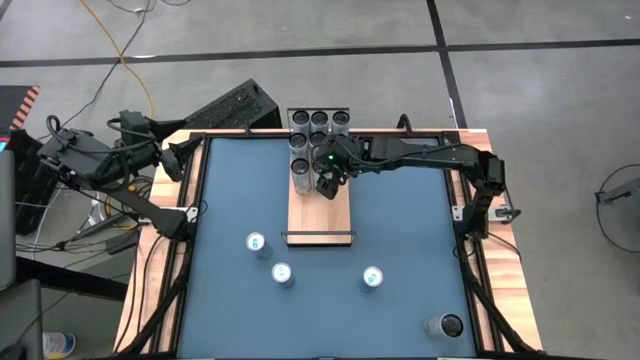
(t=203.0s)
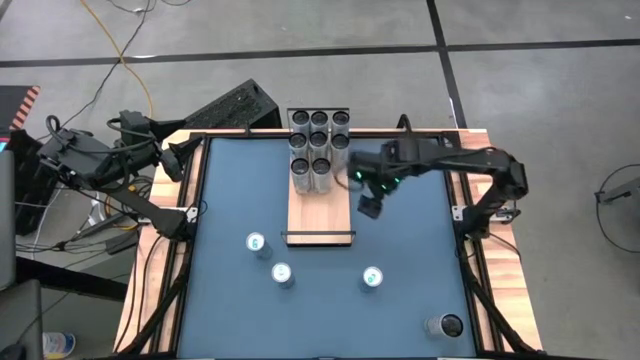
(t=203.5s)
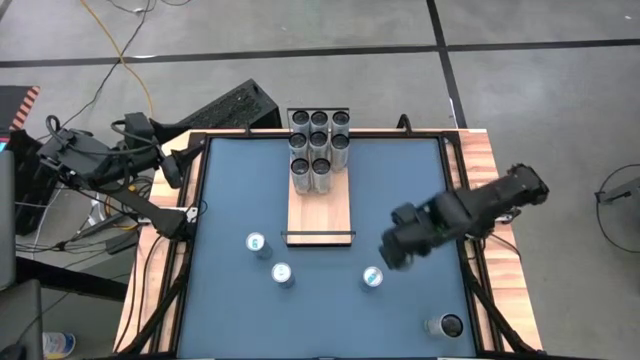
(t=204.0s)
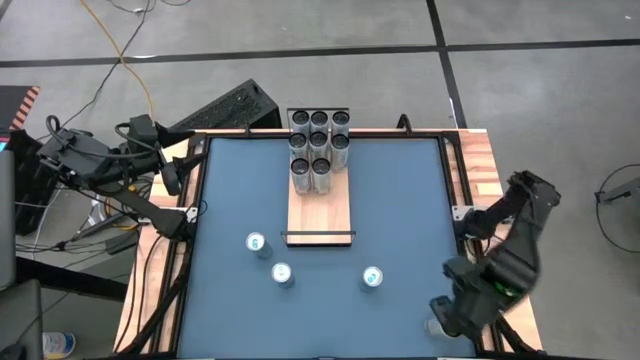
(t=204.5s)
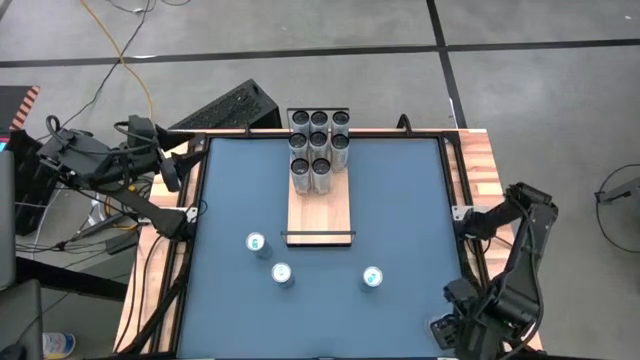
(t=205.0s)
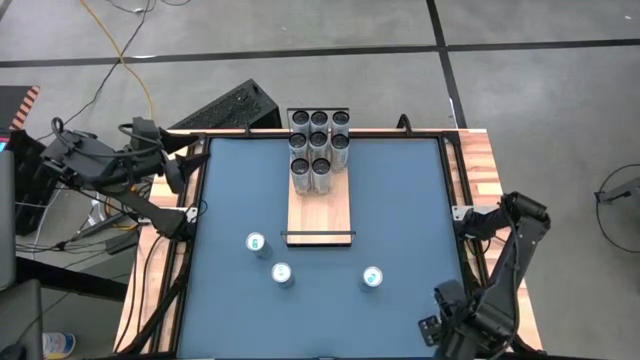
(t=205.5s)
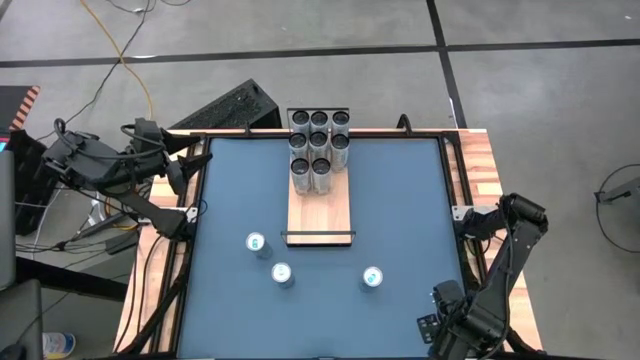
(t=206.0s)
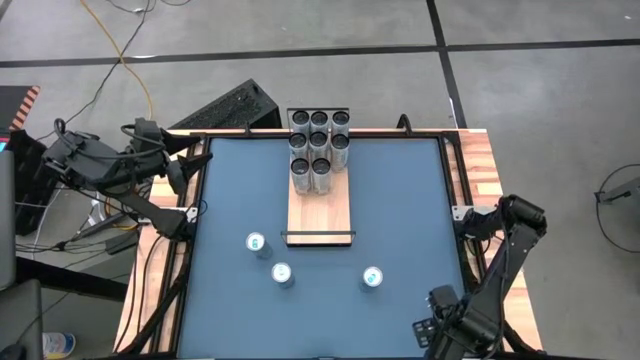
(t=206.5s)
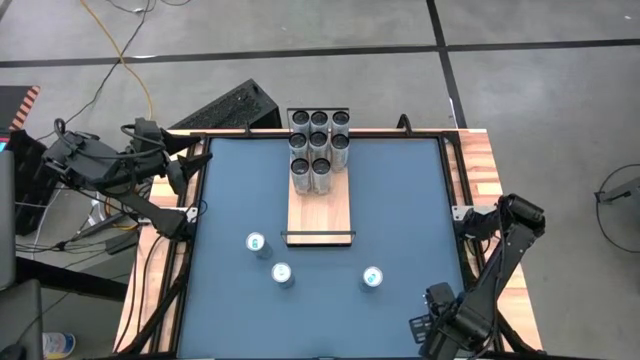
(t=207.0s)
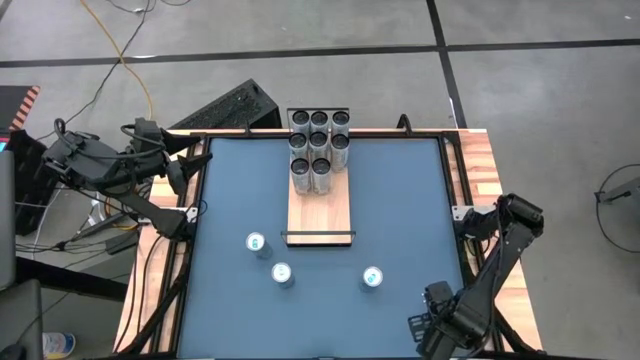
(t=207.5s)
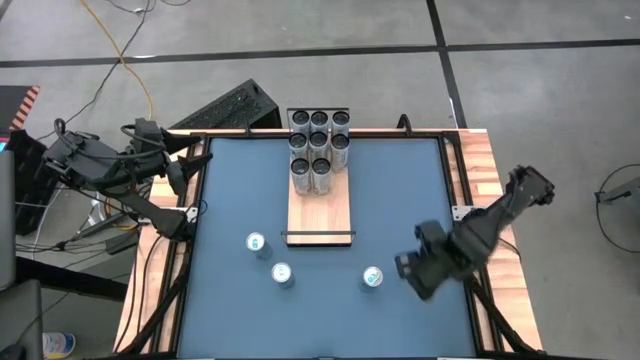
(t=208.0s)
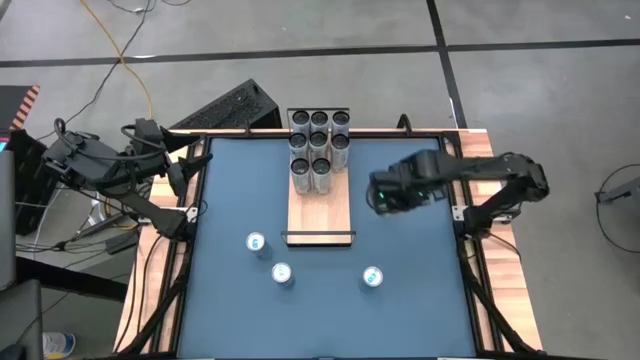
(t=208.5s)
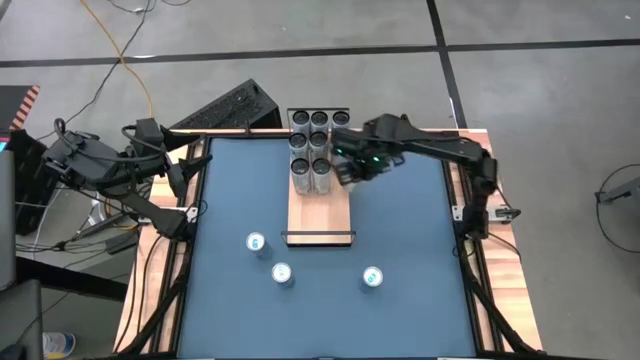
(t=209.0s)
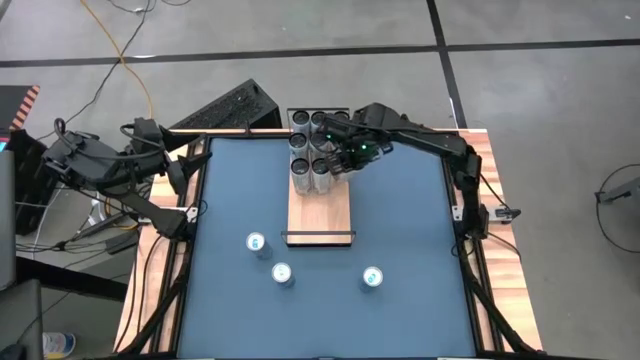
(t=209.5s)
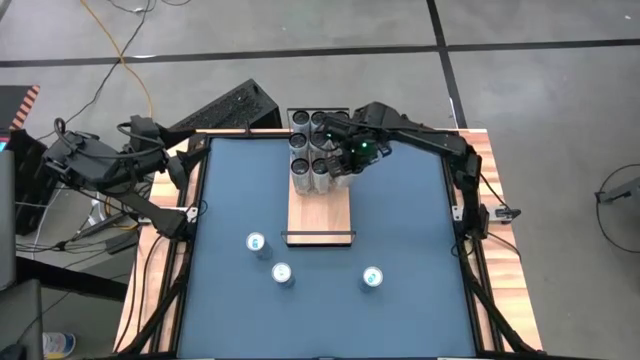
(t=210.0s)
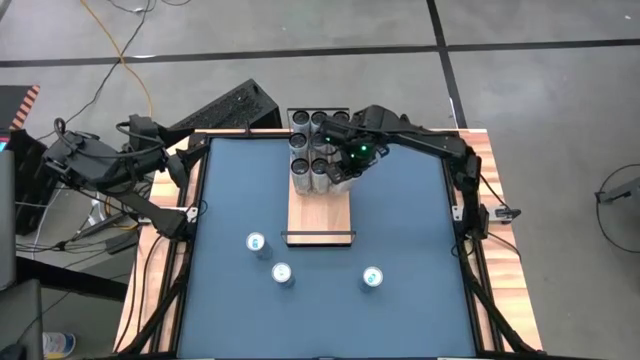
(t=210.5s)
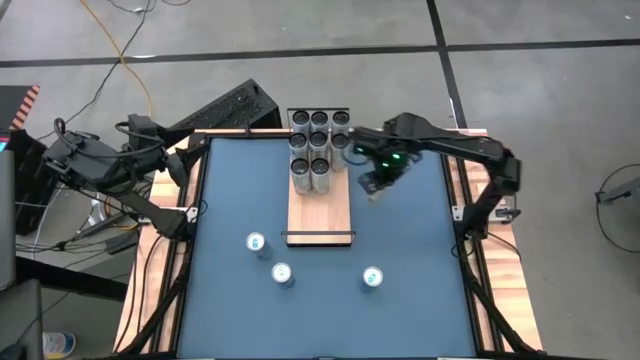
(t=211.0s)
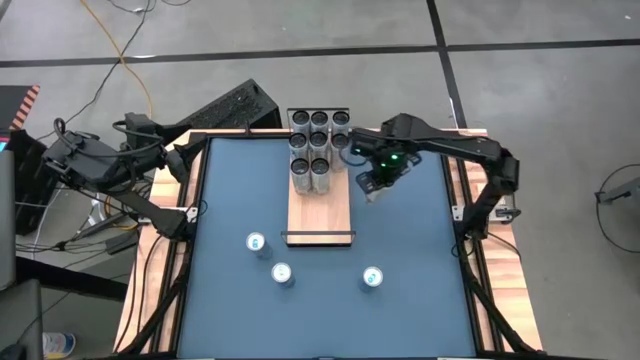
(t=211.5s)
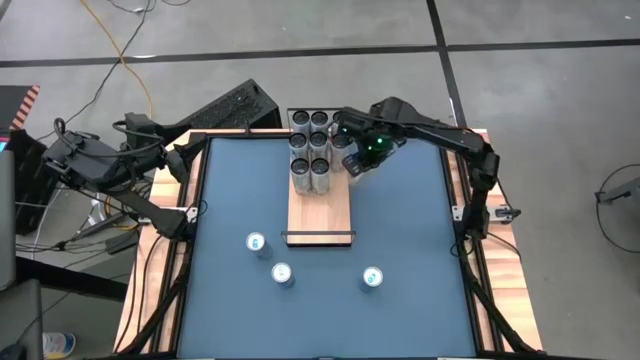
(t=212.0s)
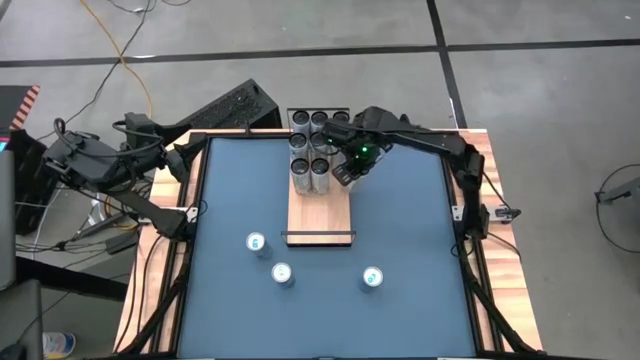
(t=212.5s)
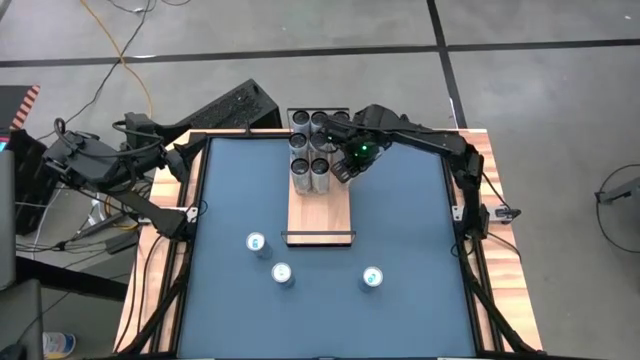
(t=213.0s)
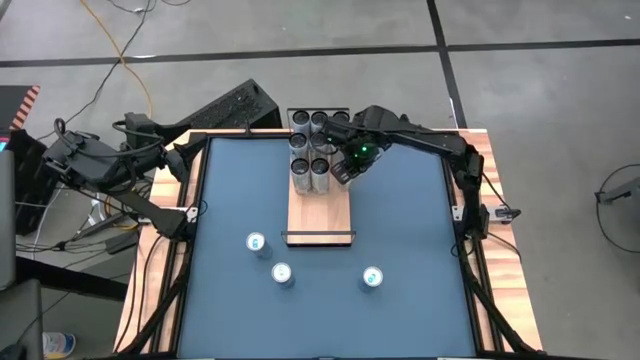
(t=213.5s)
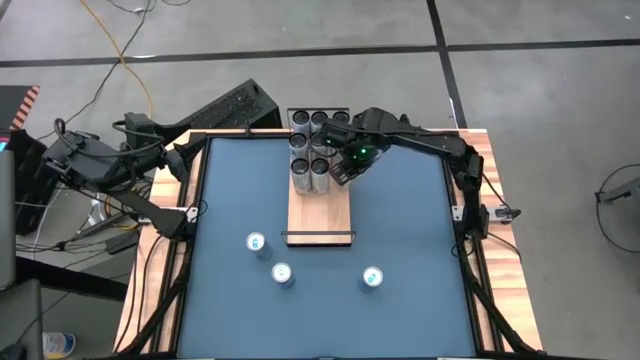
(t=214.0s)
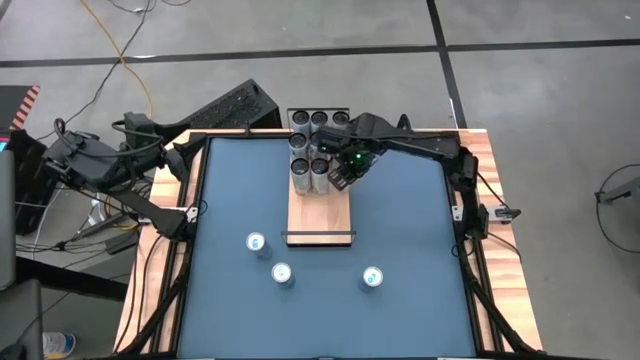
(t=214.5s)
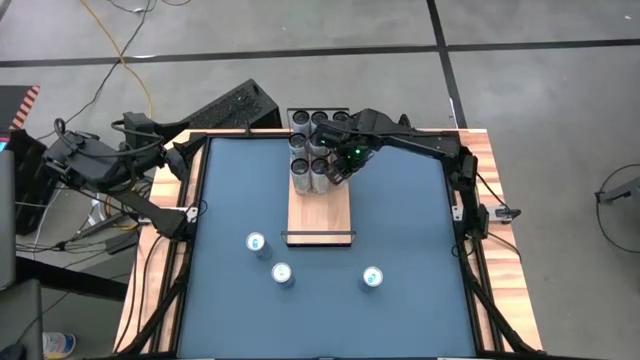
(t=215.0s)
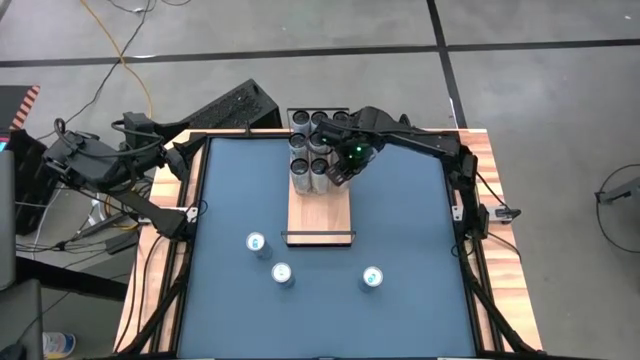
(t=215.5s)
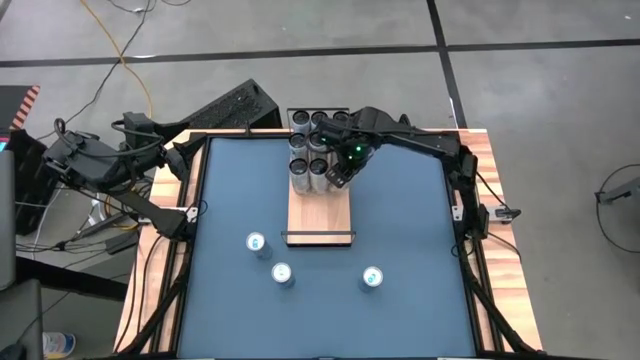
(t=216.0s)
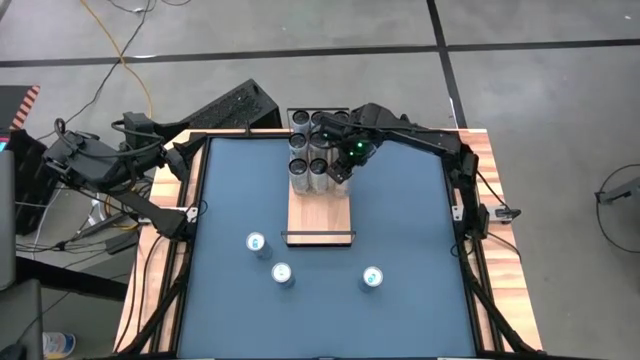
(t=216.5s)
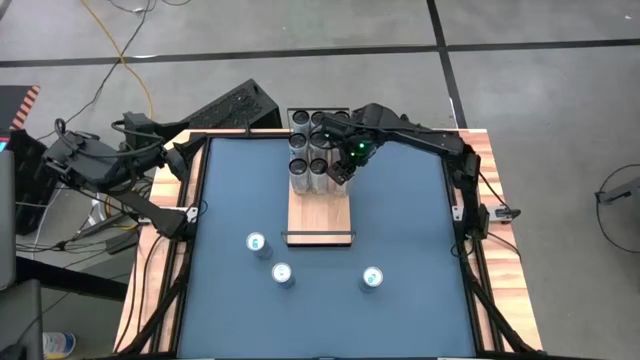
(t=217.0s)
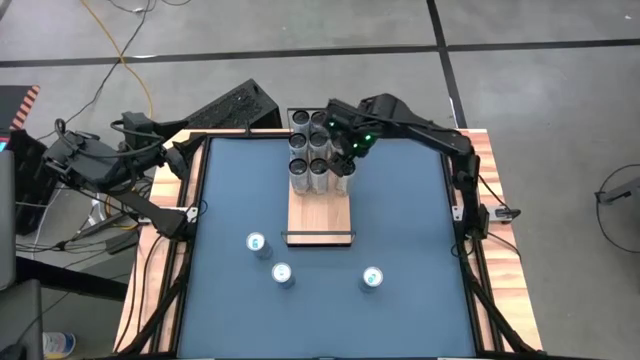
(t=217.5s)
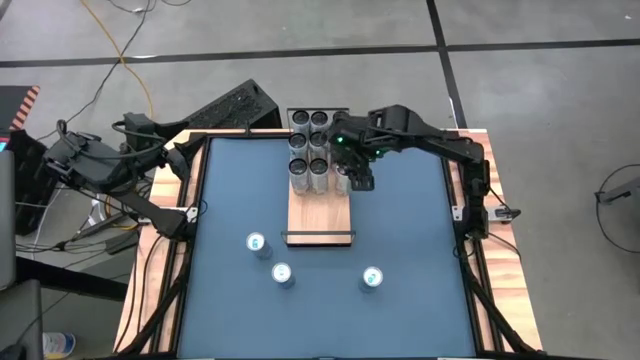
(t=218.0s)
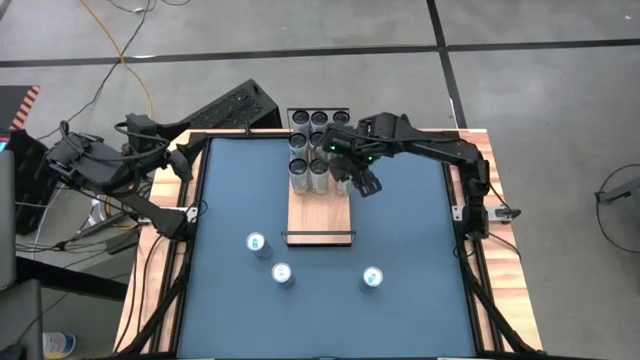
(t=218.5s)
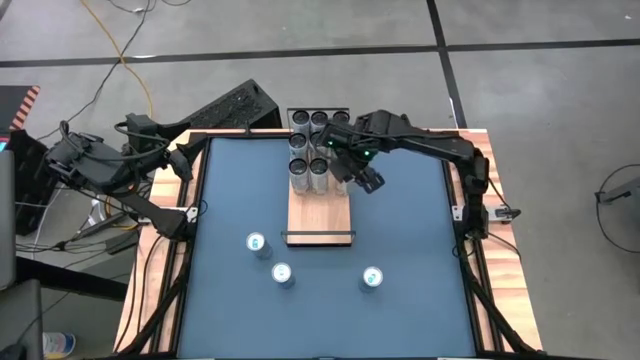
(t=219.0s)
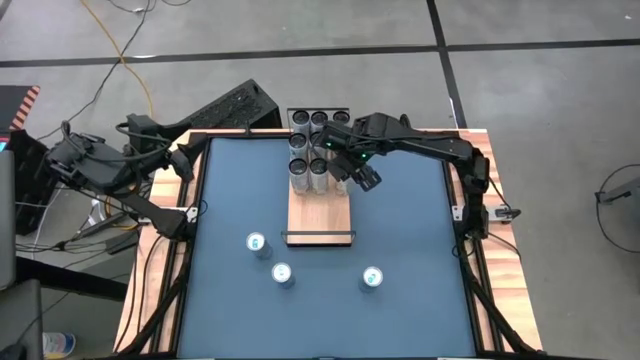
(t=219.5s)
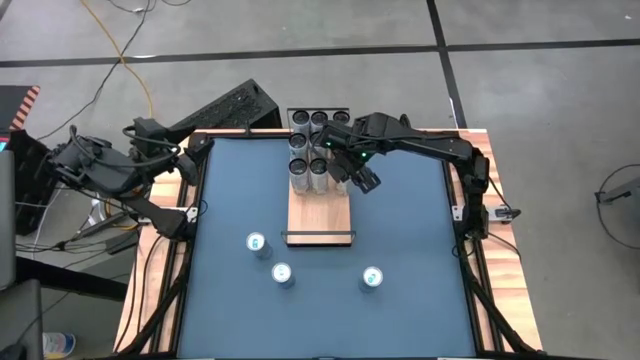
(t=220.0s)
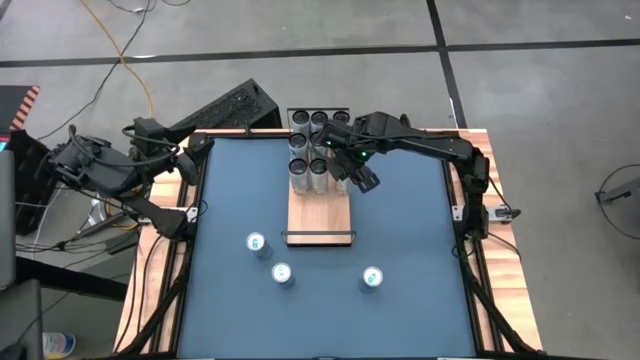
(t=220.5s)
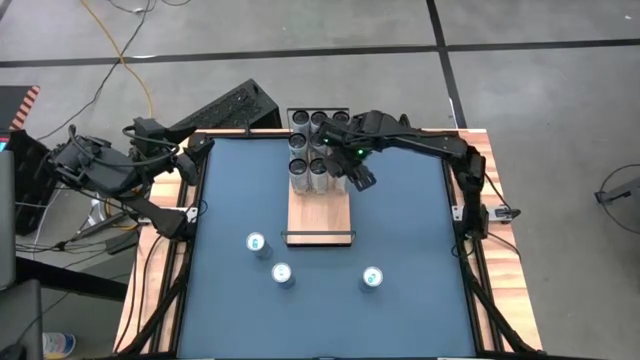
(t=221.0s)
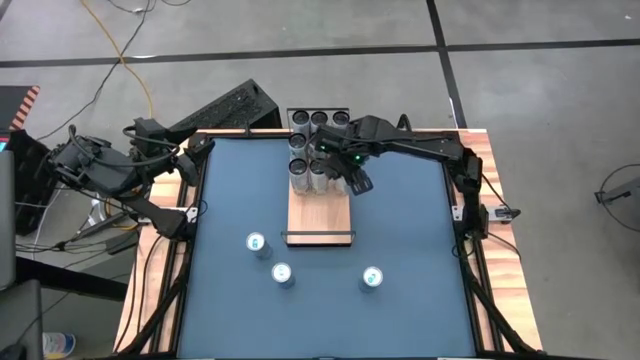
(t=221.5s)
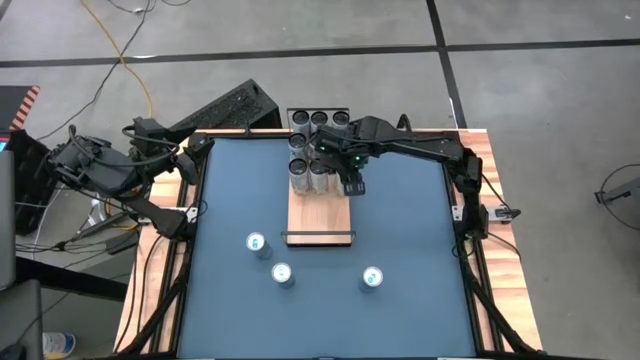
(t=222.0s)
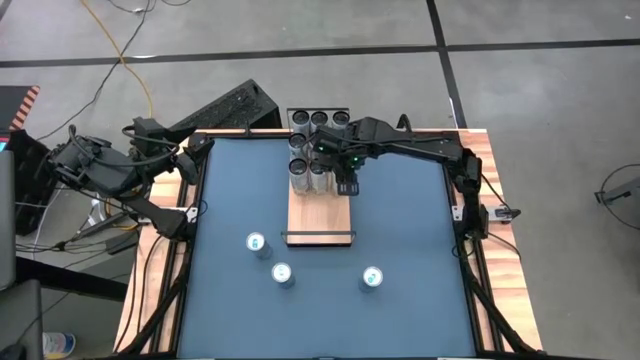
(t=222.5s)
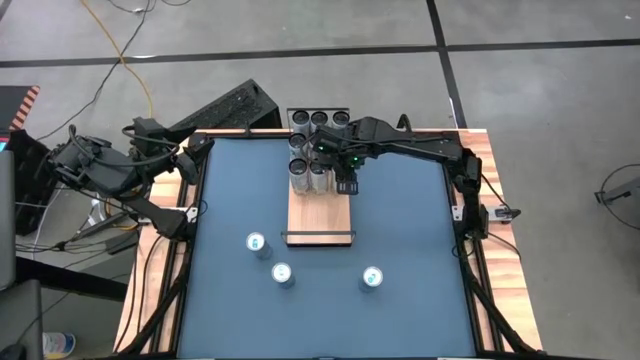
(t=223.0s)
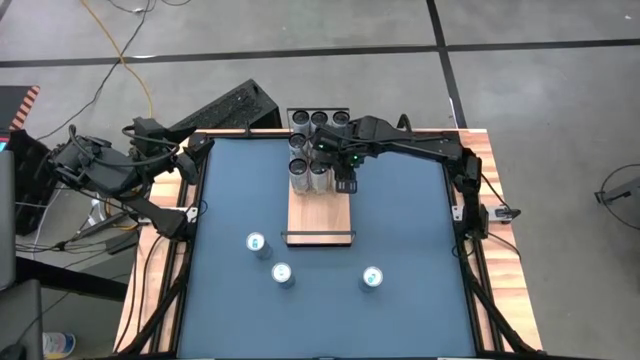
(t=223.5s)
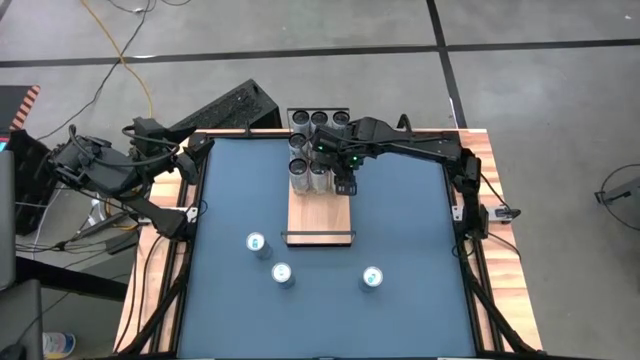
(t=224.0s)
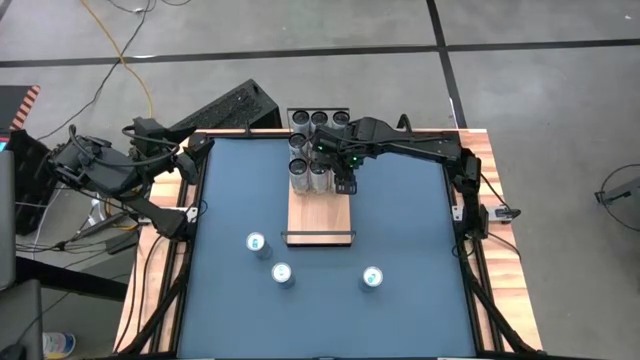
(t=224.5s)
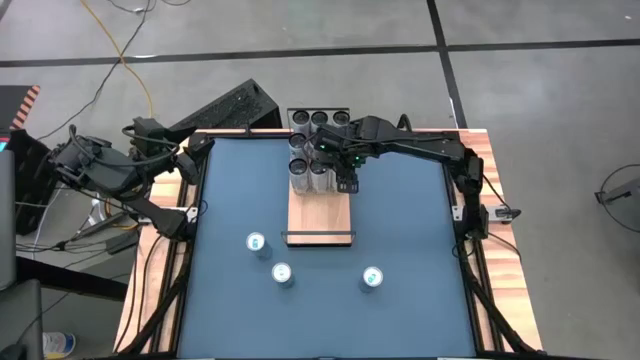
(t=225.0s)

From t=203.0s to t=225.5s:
Task: Place canned beverage on shelf
Put the white-yellow soda can on the shelf
